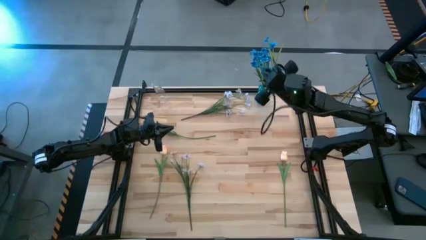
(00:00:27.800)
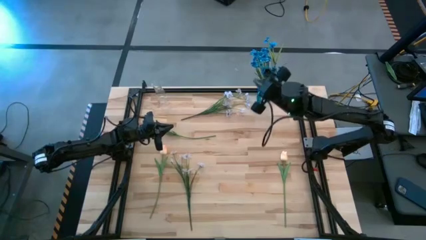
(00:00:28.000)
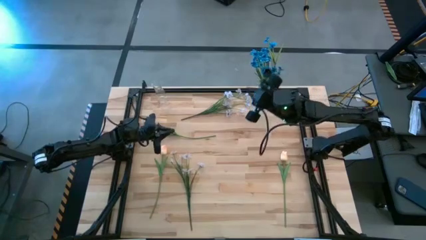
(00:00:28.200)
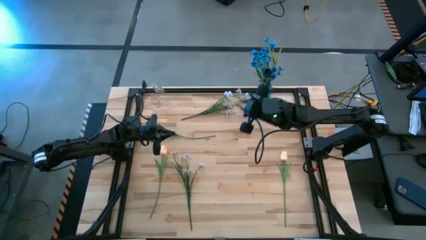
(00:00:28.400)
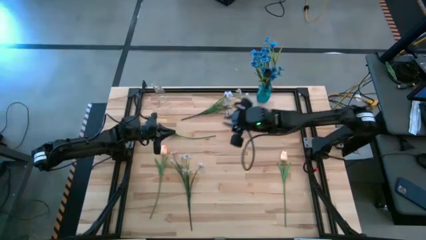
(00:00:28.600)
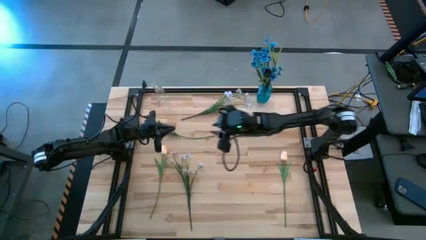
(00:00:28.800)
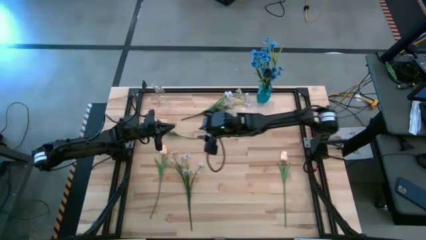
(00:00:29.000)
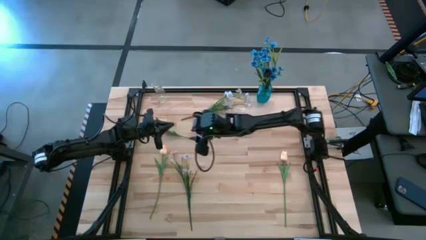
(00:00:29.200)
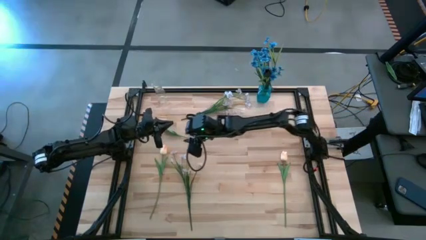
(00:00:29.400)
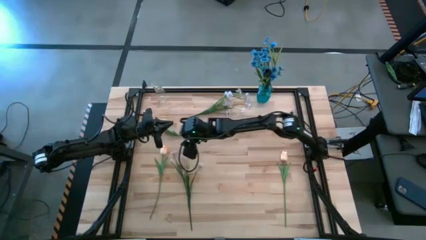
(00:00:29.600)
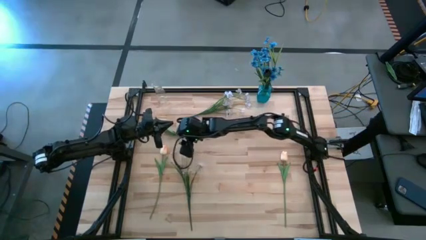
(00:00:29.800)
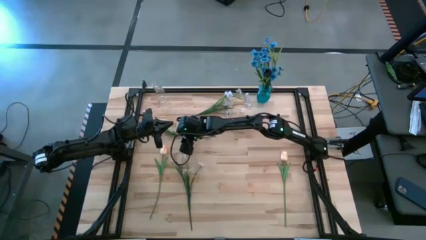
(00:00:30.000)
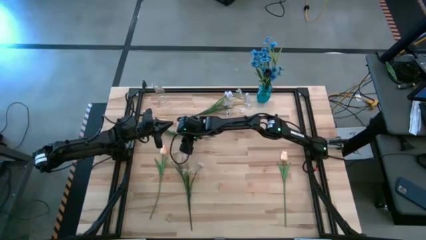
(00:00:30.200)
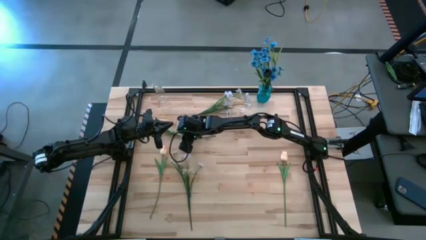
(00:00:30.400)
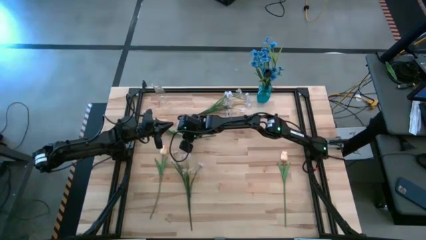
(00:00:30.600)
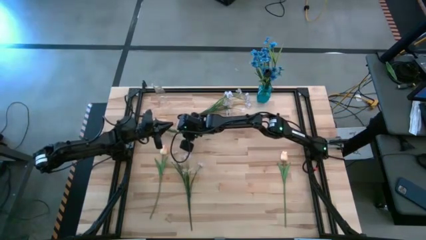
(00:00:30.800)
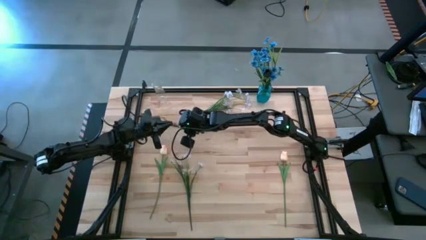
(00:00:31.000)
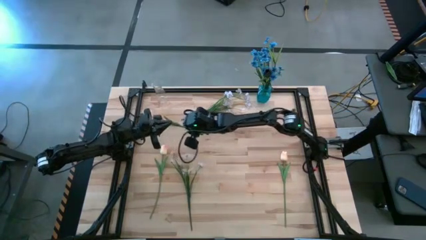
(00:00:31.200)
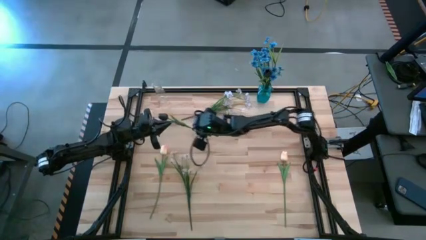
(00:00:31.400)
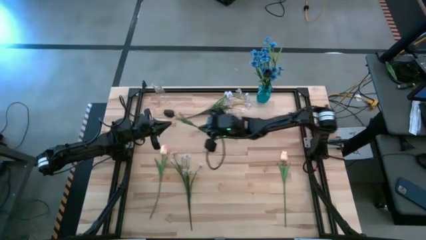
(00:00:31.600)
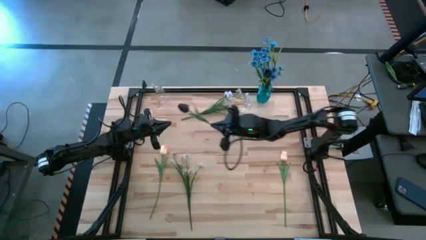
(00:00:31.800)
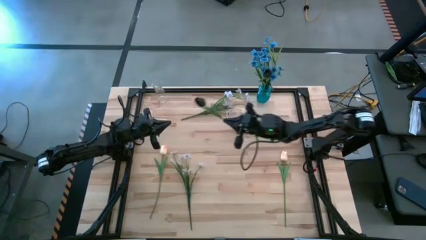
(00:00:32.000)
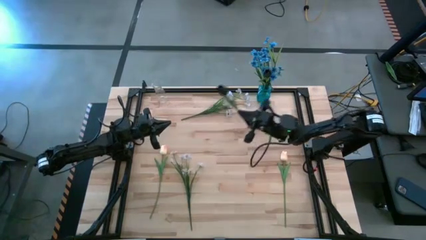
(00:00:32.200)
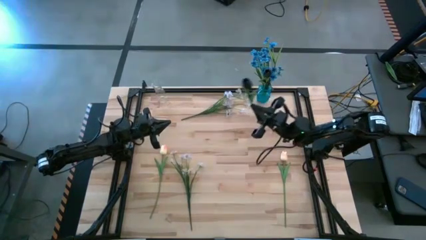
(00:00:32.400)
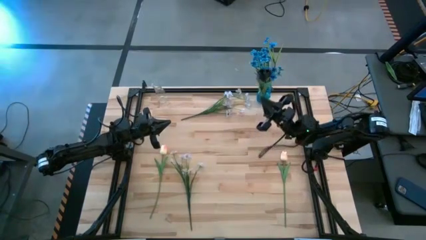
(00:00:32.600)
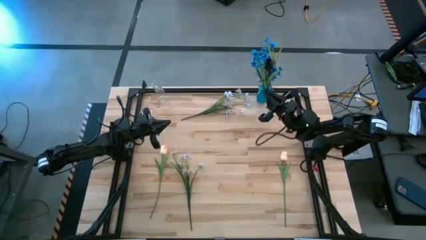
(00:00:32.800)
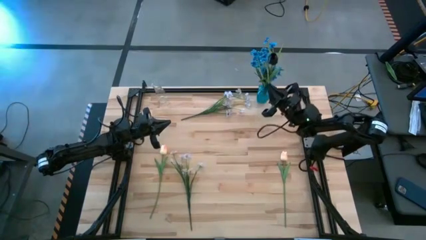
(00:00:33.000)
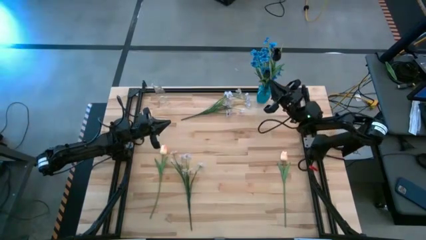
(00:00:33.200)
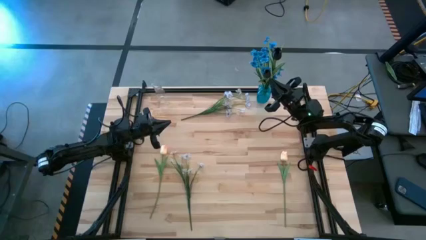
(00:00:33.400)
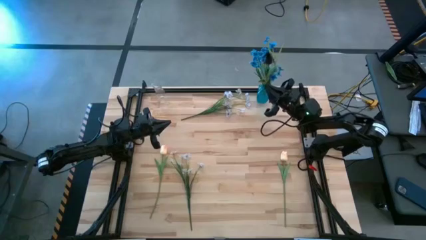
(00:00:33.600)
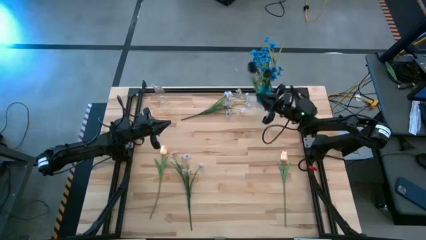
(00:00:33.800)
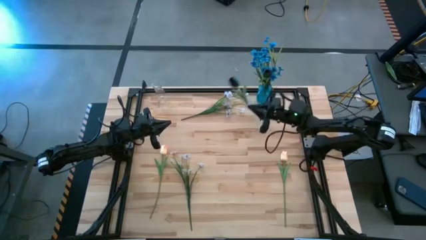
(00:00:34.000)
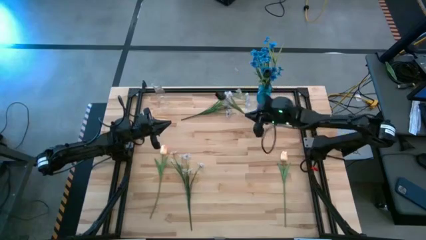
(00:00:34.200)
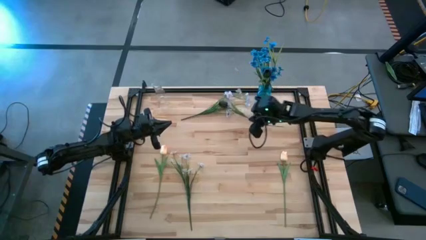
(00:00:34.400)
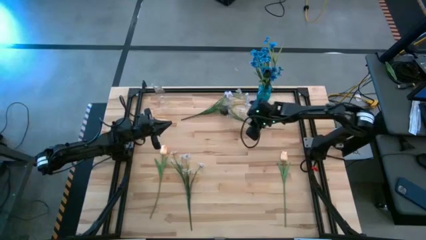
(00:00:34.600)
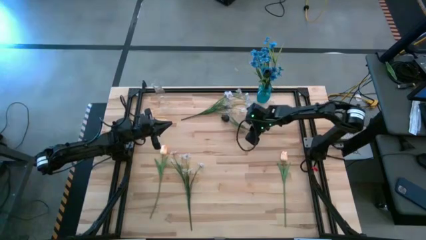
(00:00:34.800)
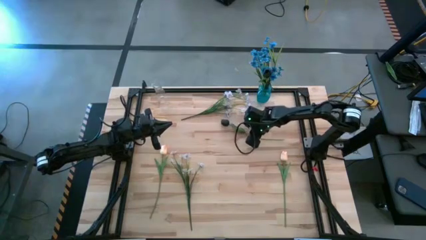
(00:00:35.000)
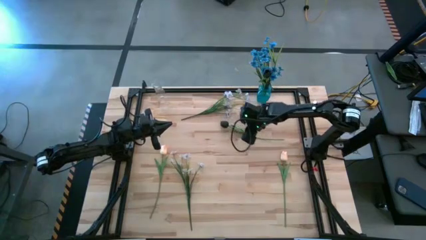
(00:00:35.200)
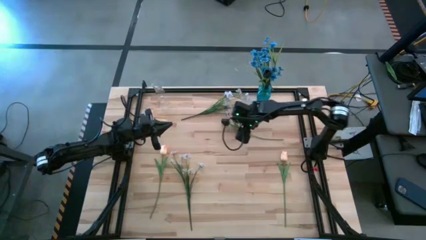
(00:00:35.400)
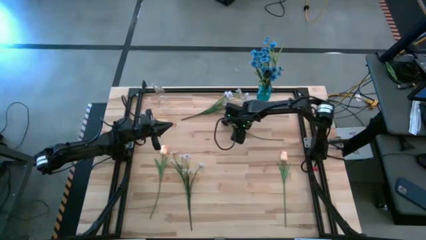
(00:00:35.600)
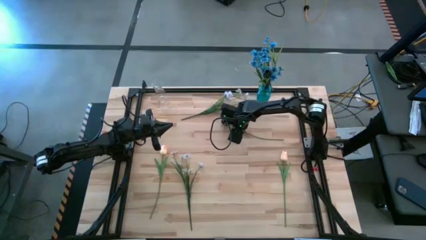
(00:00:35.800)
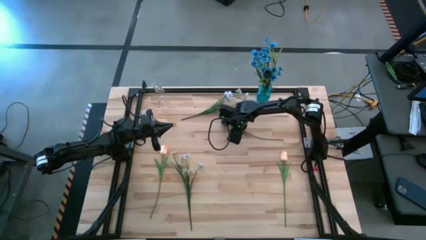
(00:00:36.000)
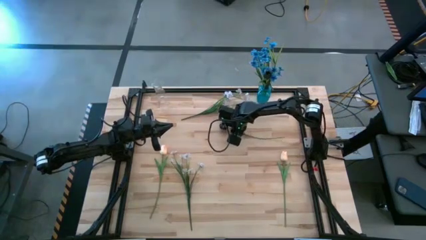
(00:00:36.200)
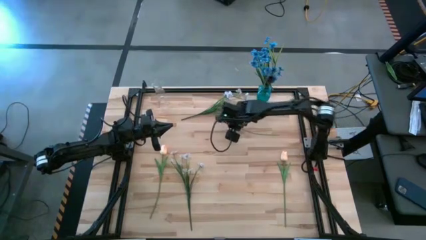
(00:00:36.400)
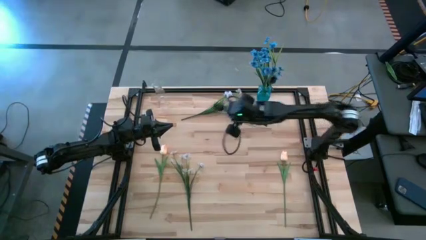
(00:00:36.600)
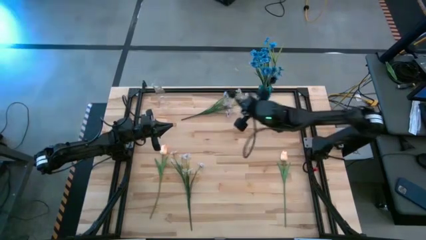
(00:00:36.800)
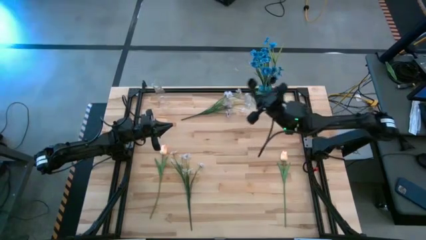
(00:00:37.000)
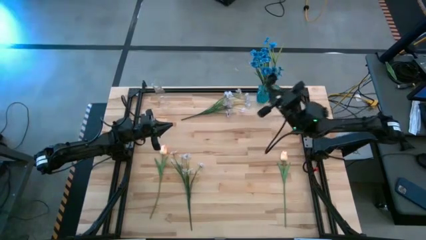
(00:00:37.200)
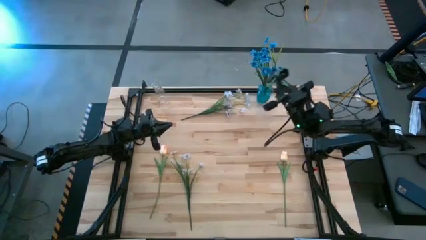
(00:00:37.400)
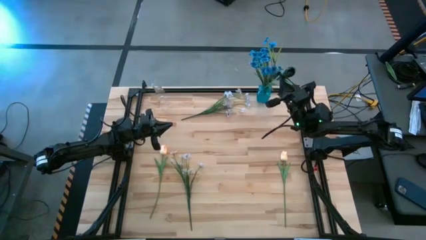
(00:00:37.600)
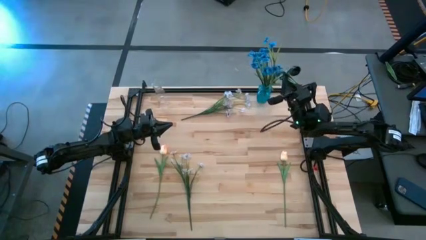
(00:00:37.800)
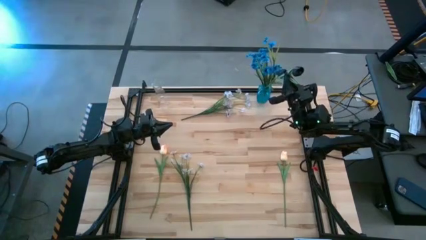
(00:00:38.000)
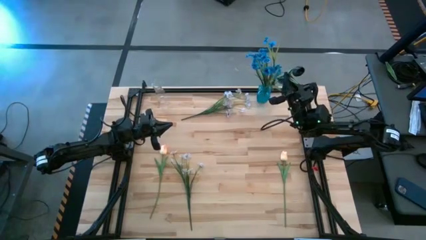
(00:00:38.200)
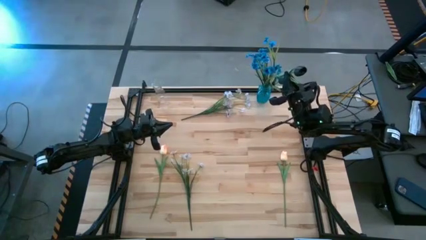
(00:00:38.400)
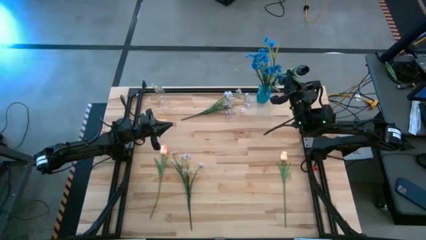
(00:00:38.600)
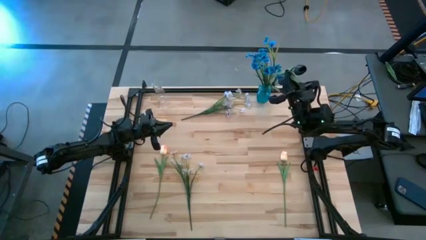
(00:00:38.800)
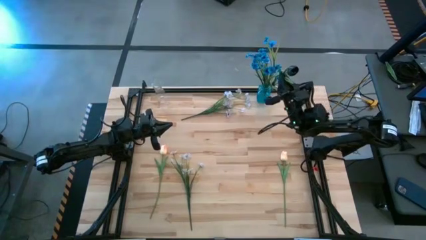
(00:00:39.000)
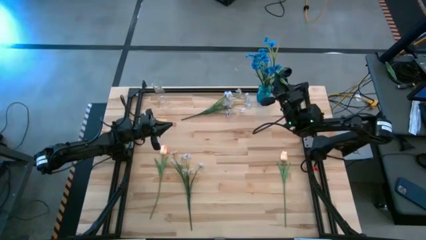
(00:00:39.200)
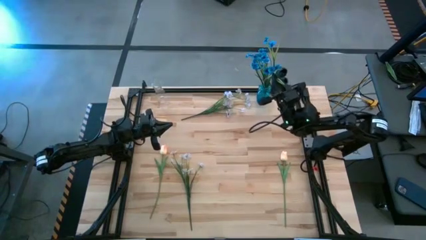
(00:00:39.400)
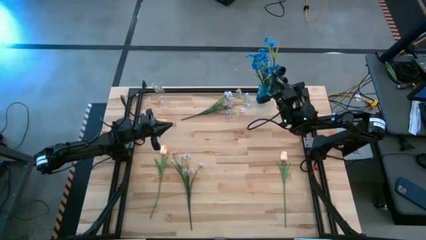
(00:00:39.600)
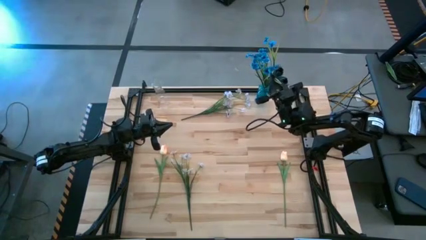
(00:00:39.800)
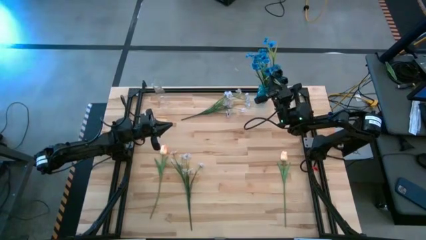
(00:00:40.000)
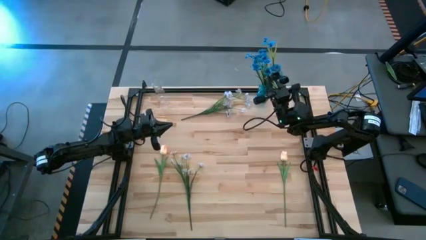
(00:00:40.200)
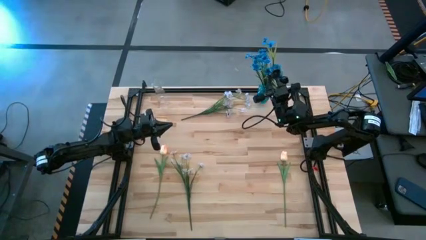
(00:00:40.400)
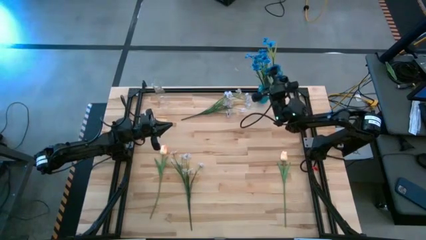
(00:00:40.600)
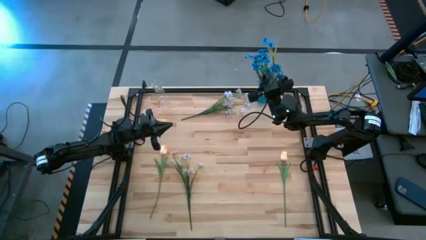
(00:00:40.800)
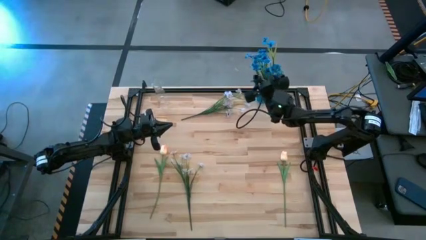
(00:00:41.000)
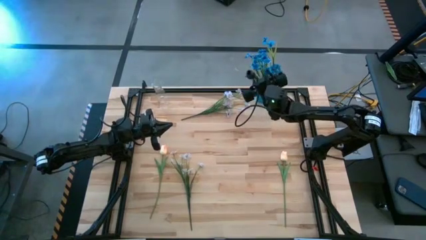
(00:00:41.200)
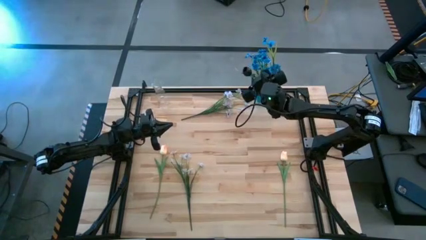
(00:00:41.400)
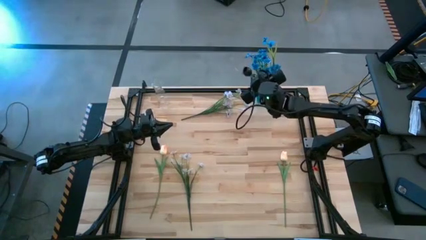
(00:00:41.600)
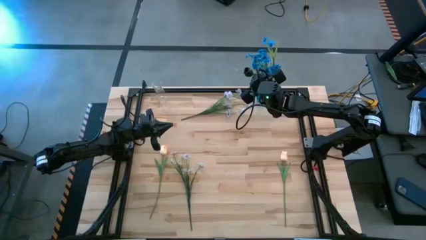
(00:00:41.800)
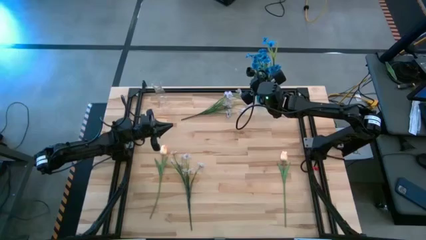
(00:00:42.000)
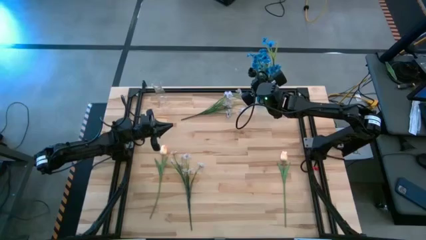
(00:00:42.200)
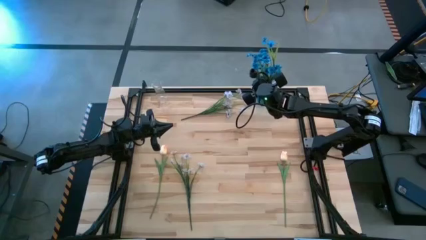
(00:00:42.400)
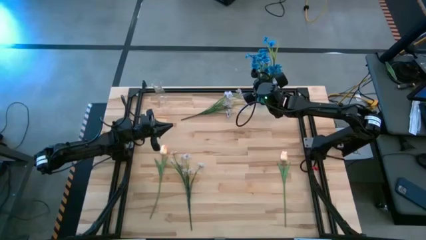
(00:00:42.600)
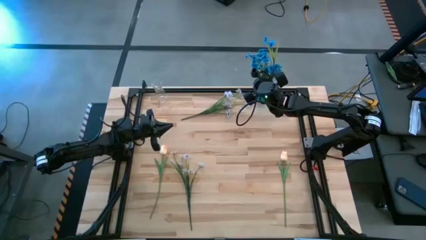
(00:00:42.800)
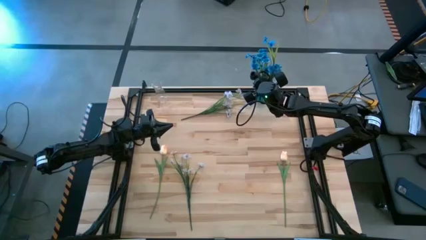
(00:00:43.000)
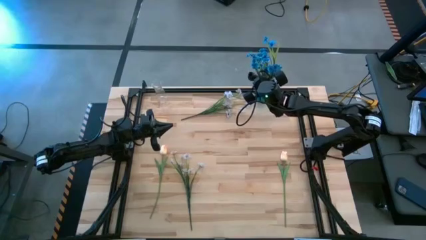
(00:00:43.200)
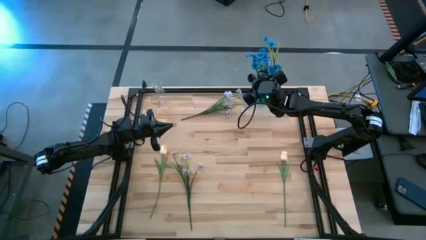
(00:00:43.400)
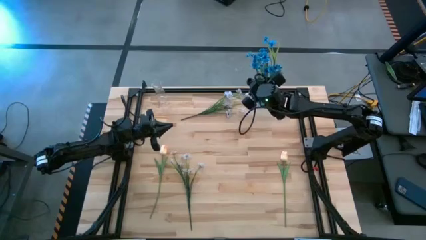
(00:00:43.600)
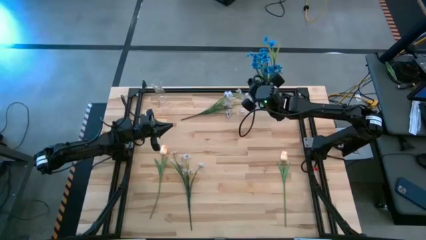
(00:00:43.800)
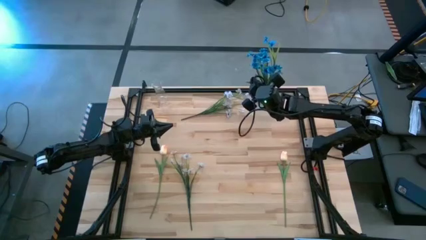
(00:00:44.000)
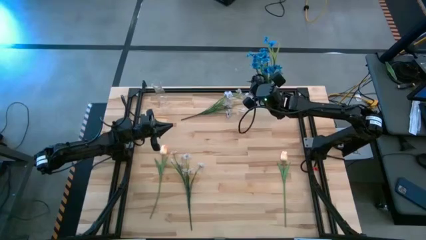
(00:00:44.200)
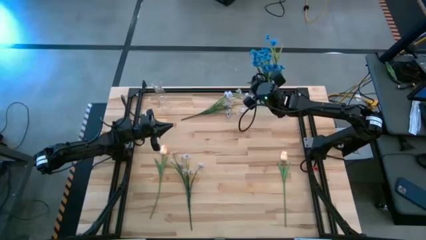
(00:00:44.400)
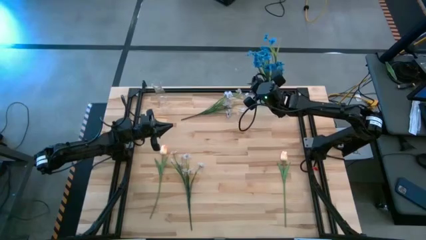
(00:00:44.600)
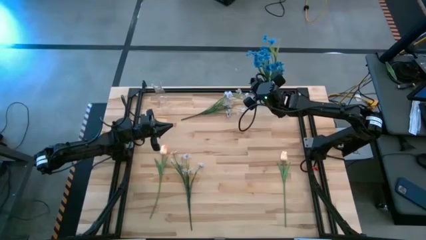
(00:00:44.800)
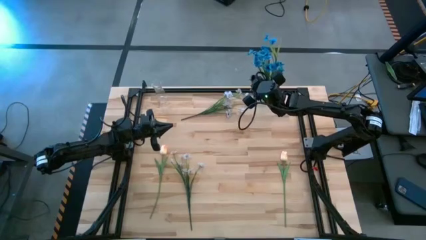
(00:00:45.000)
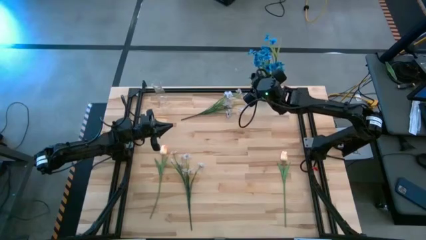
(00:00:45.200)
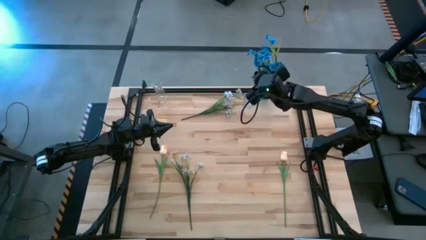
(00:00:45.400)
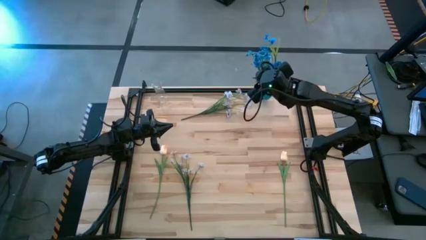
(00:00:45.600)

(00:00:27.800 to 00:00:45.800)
Task: Sort flowers into vase by color
Put the black flower into the blue vase
